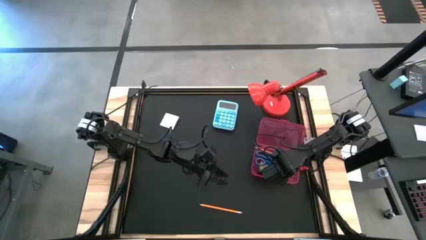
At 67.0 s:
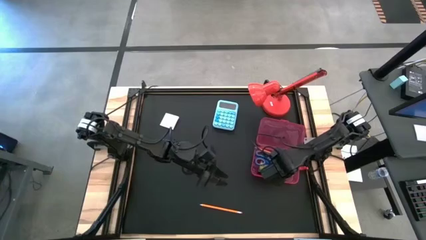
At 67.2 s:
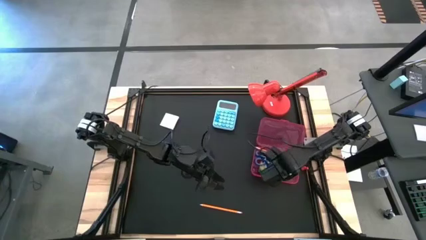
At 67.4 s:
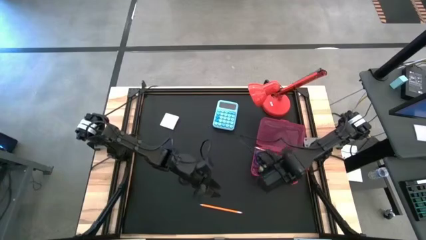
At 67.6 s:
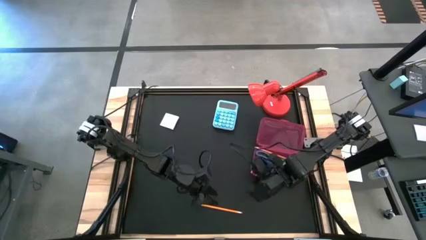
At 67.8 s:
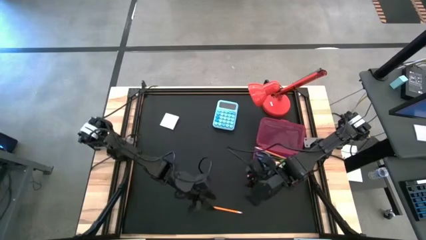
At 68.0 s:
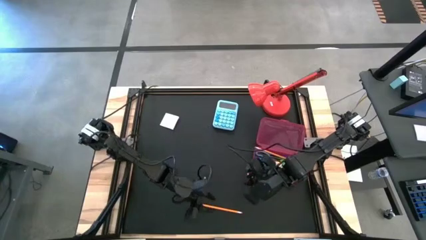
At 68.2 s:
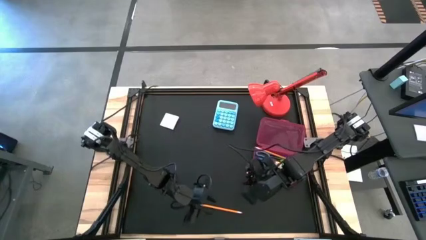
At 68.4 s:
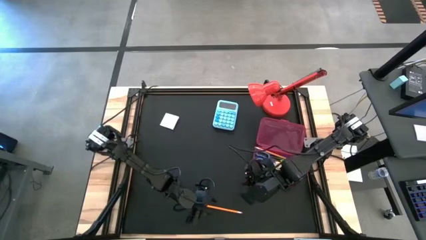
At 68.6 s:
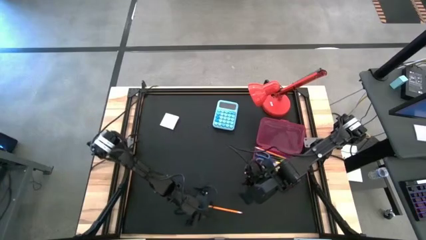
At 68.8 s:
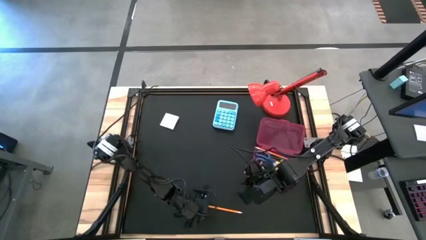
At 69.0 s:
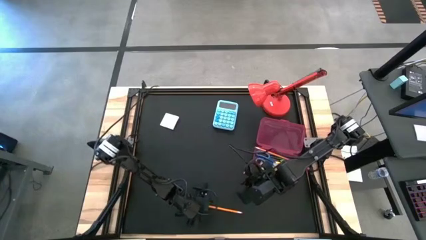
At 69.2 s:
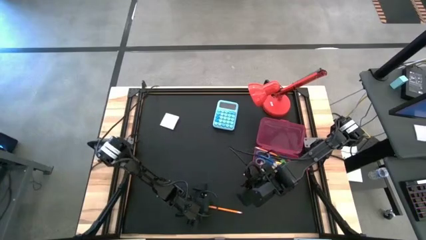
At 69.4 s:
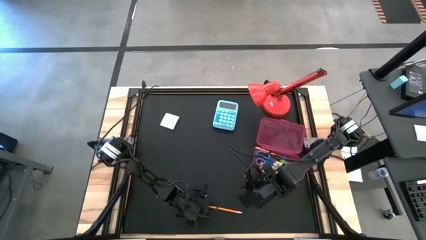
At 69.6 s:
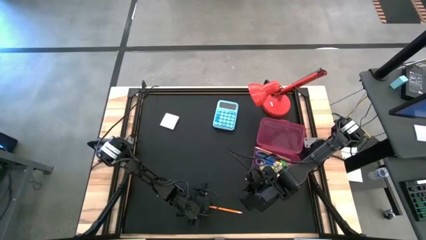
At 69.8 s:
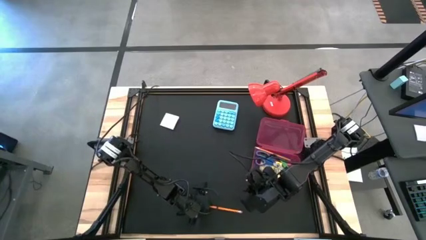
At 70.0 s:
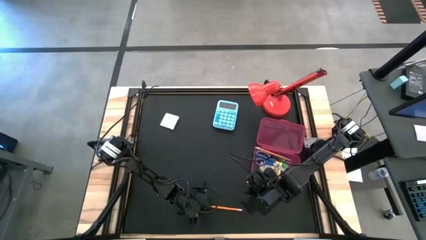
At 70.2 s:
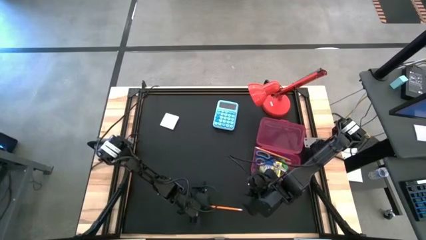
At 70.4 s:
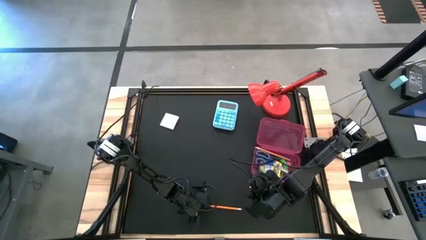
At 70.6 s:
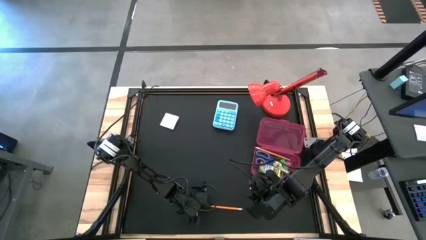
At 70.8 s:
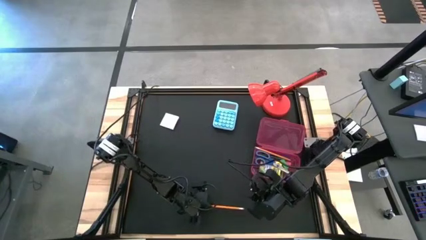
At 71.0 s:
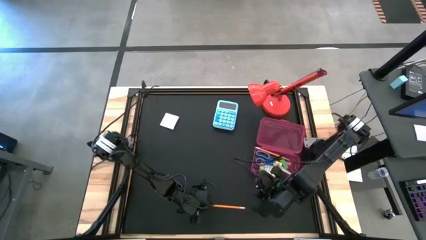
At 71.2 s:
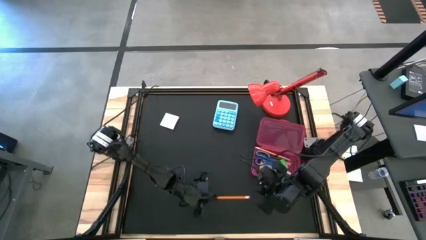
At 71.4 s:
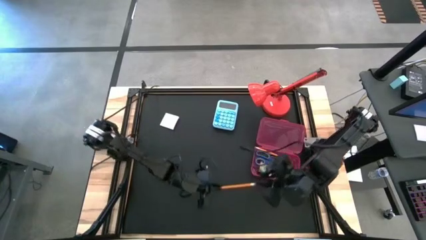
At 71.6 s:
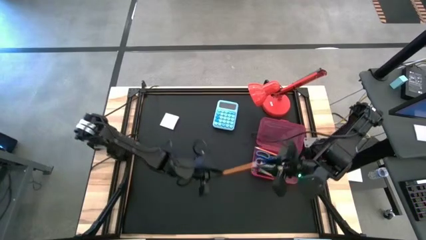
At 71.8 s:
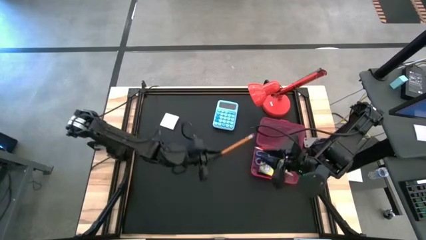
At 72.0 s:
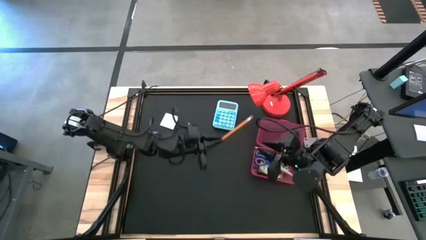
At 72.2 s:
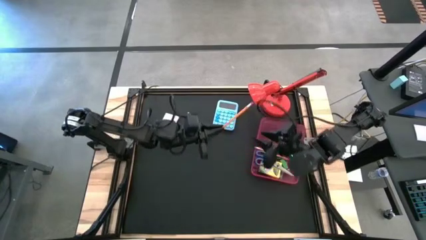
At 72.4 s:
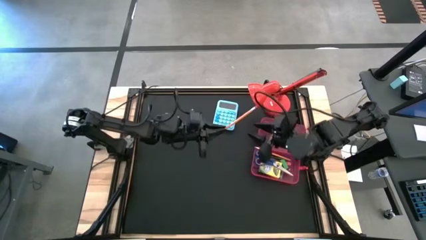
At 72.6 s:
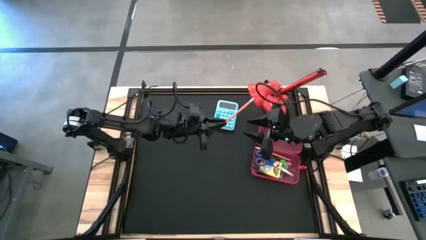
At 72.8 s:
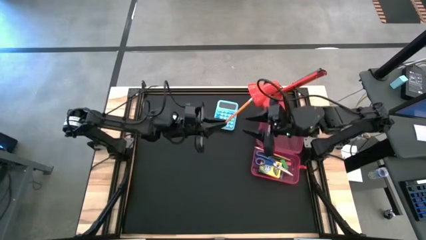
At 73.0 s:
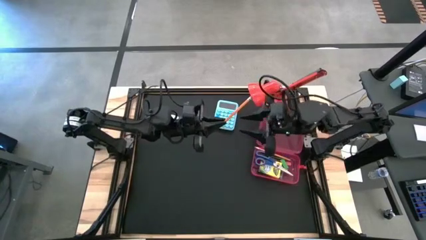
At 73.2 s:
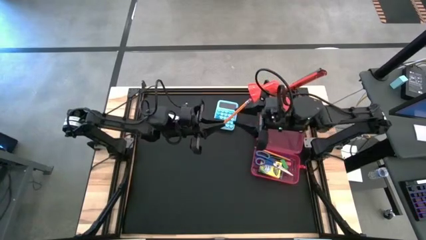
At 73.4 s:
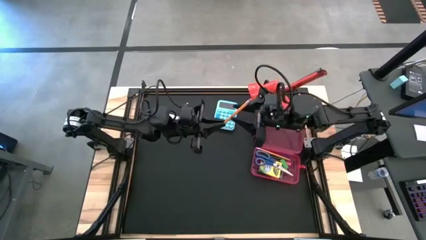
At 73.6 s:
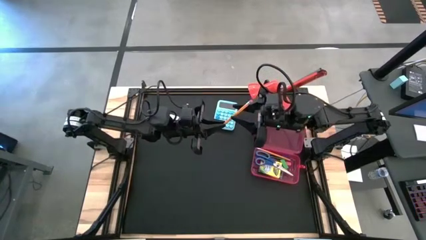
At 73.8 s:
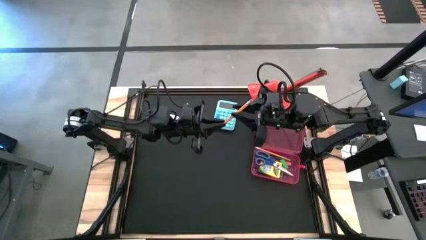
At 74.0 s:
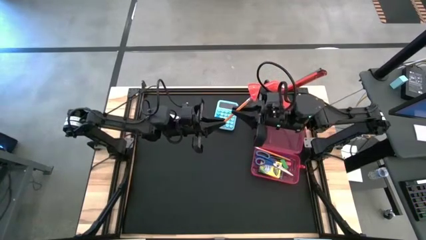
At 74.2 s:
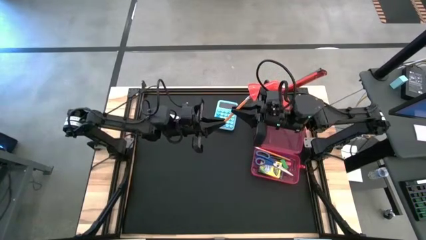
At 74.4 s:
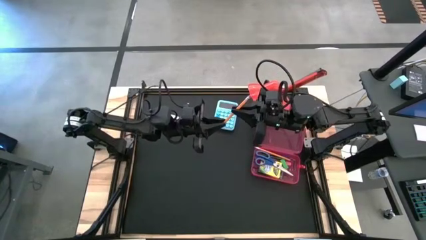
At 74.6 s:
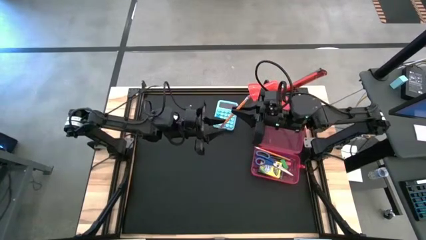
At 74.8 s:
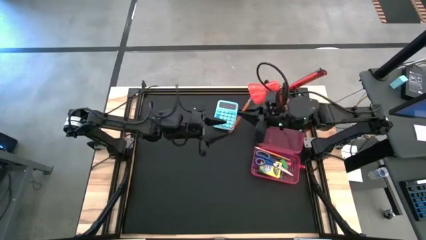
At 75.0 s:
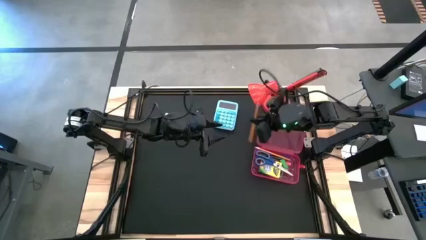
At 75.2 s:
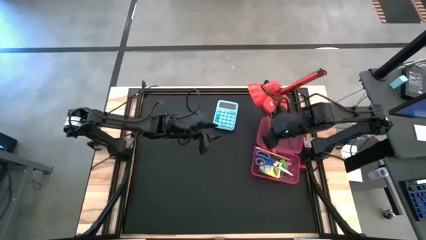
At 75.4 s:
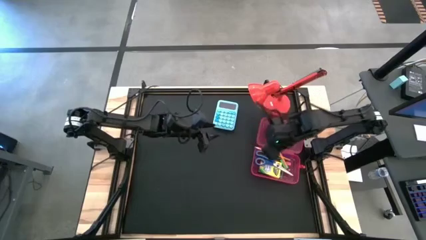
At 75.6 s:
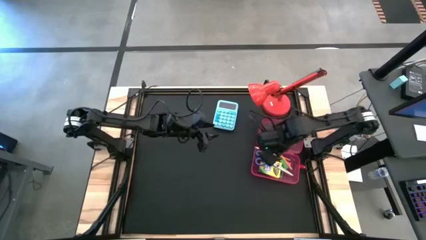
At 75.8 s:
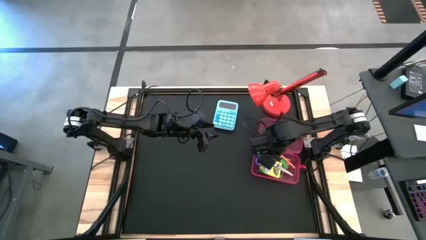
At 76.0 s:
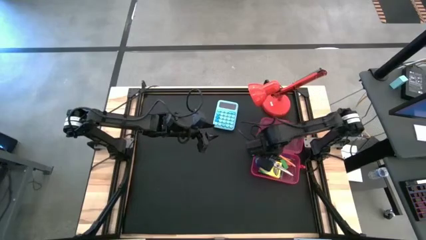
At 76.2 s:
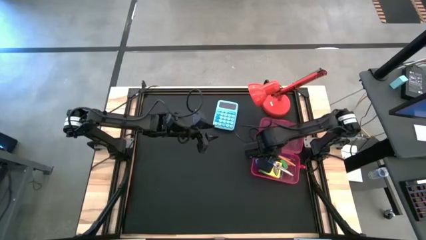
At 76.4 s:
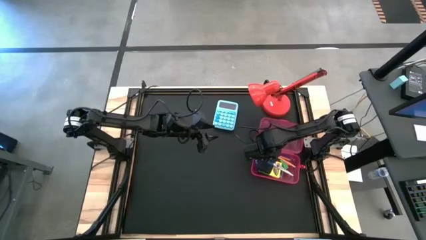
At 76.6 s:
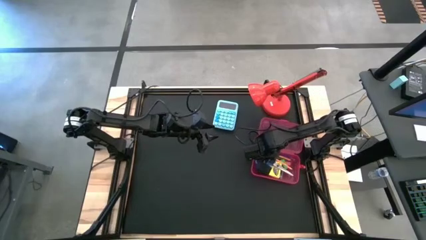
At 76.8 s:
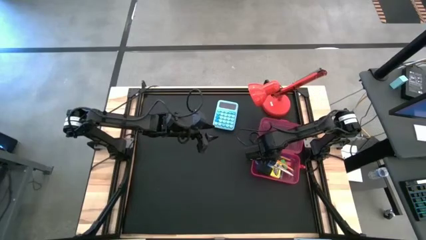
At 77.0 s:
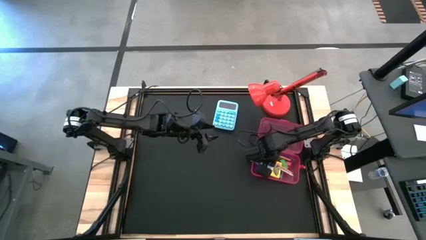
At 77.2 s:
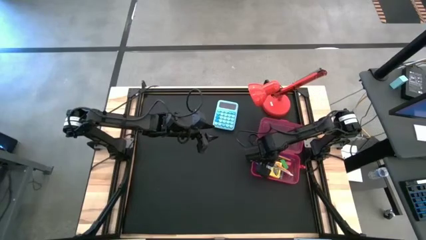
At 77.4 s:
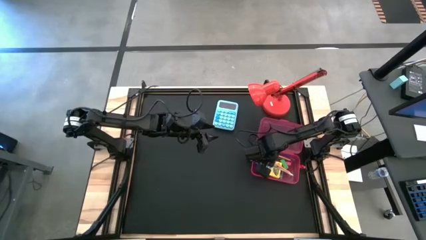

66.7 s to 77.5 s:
Task: Pack school essentials
Put the orange pencil into the red supply box
